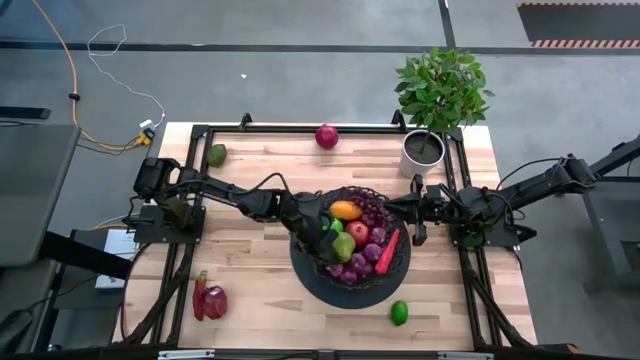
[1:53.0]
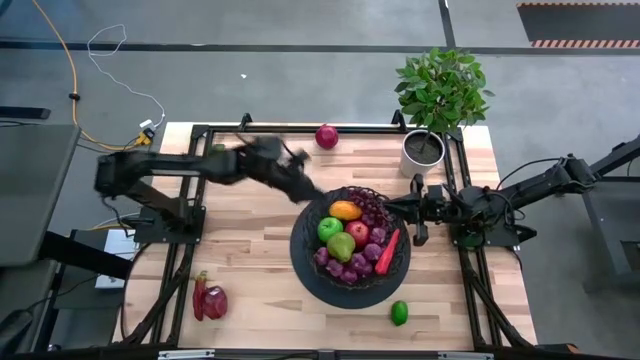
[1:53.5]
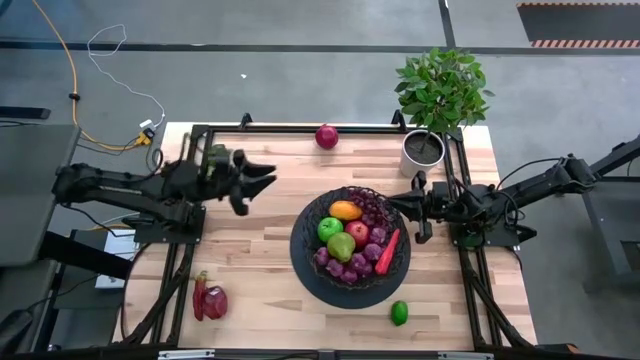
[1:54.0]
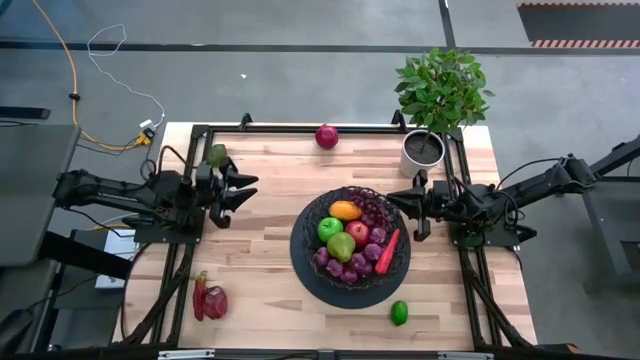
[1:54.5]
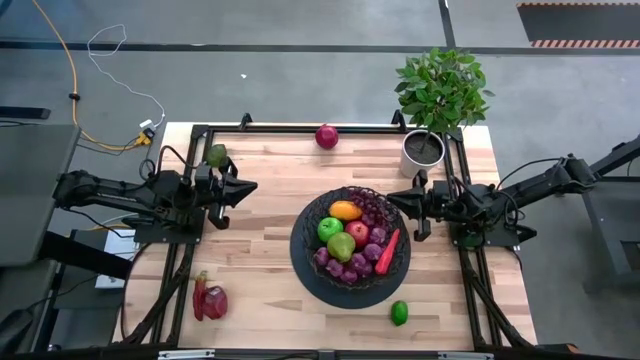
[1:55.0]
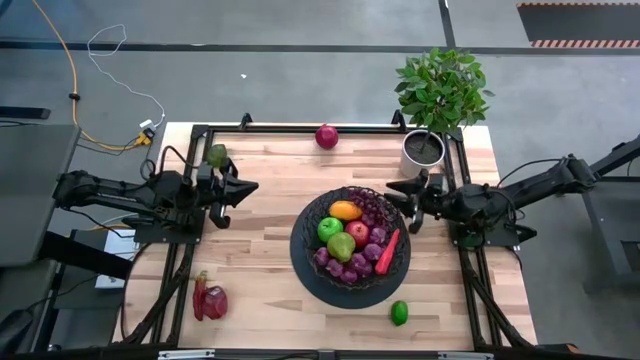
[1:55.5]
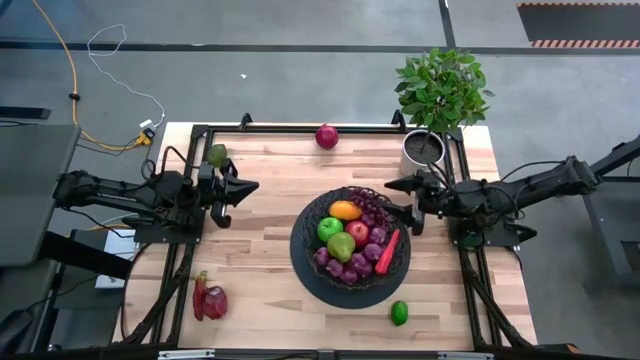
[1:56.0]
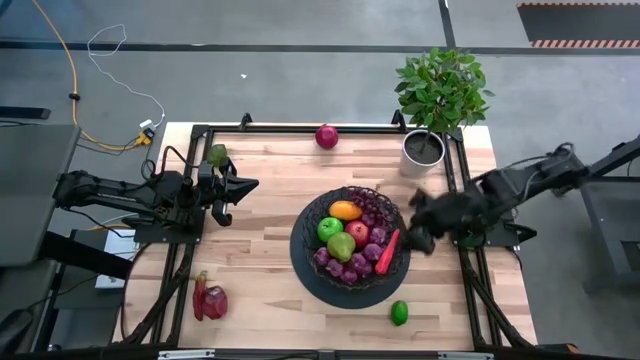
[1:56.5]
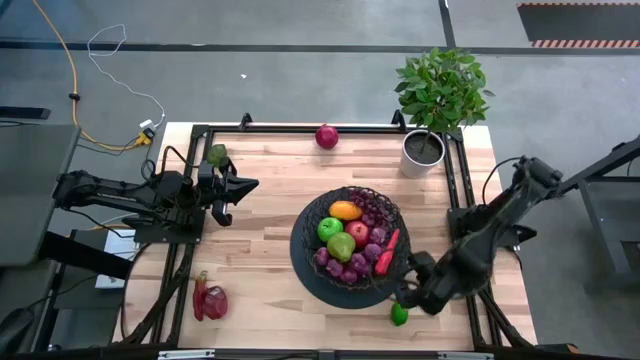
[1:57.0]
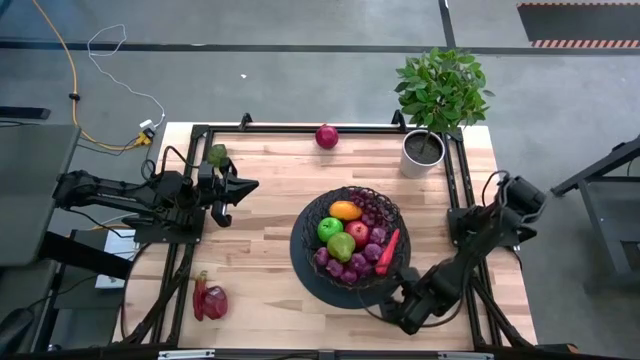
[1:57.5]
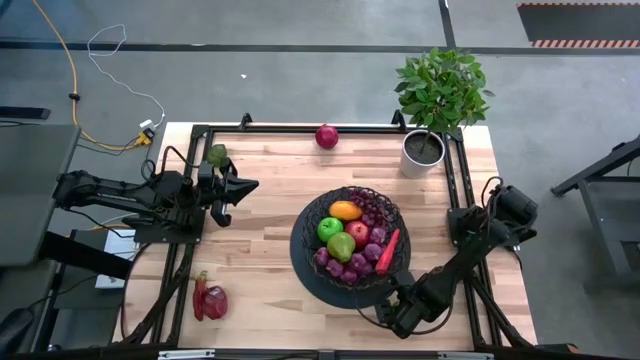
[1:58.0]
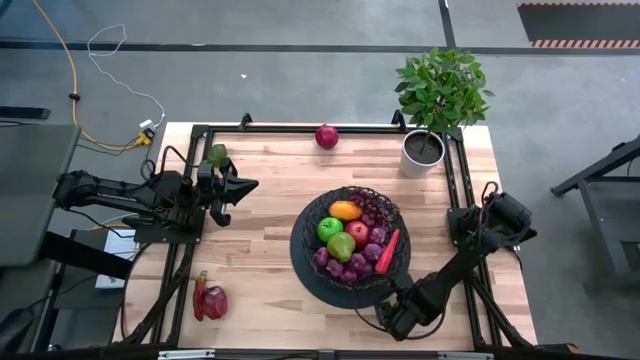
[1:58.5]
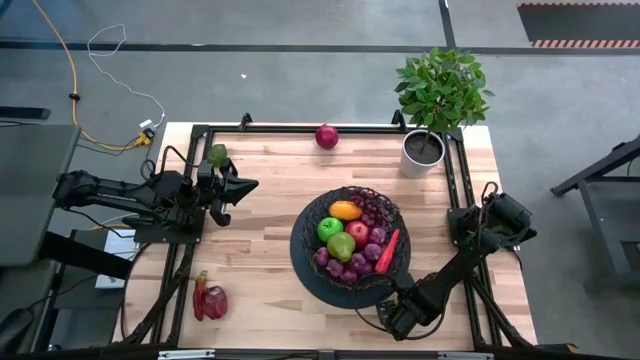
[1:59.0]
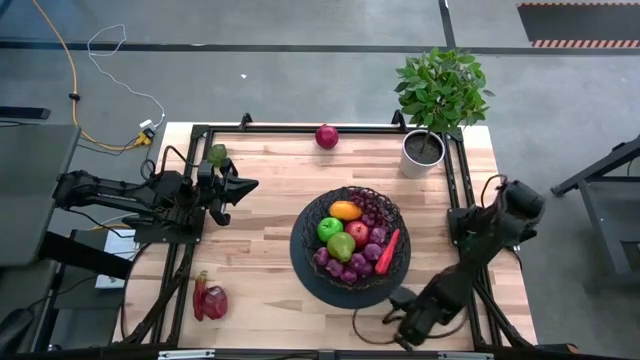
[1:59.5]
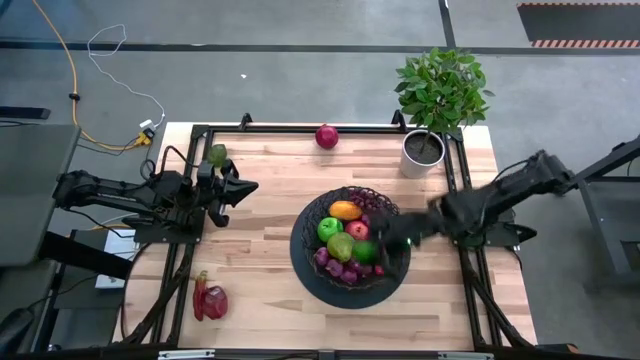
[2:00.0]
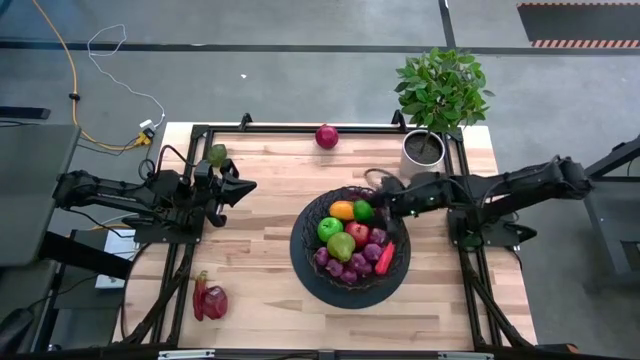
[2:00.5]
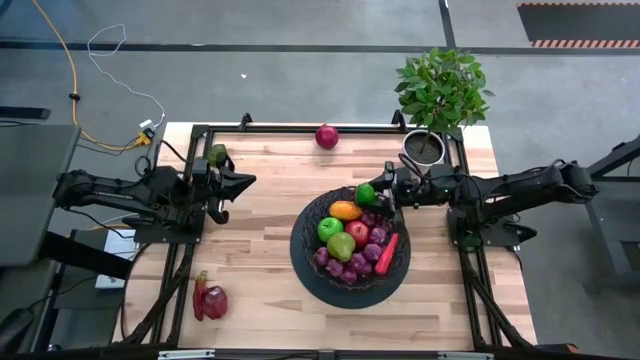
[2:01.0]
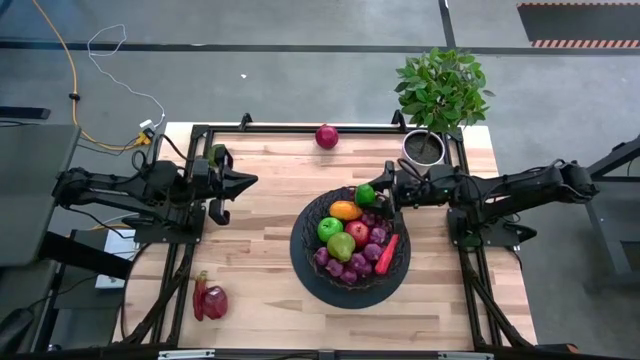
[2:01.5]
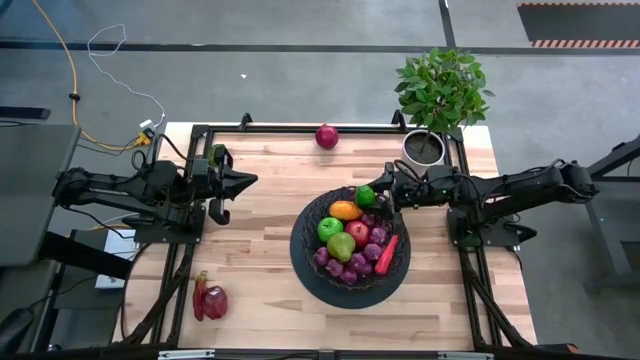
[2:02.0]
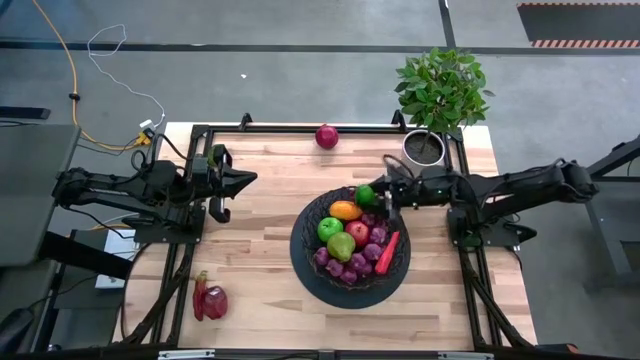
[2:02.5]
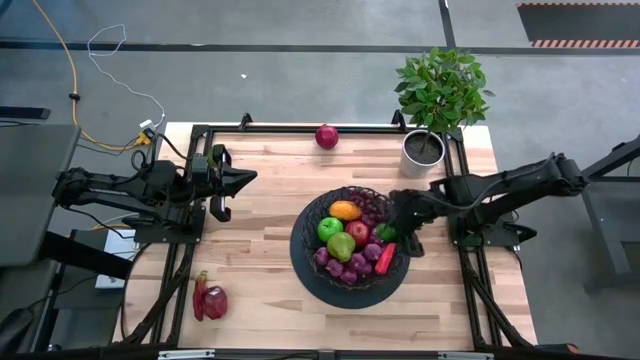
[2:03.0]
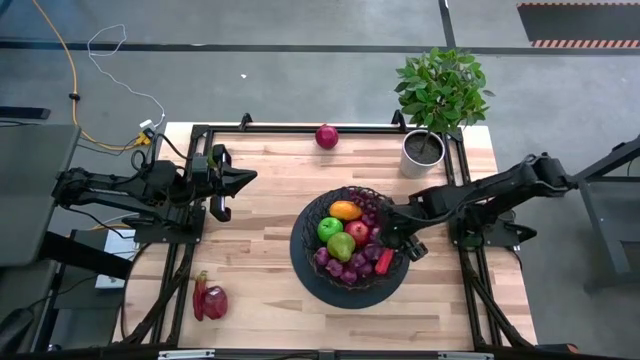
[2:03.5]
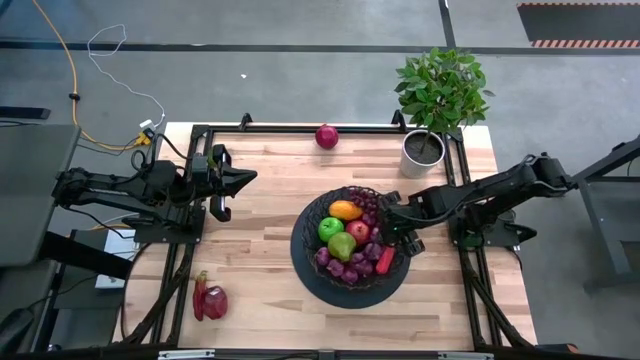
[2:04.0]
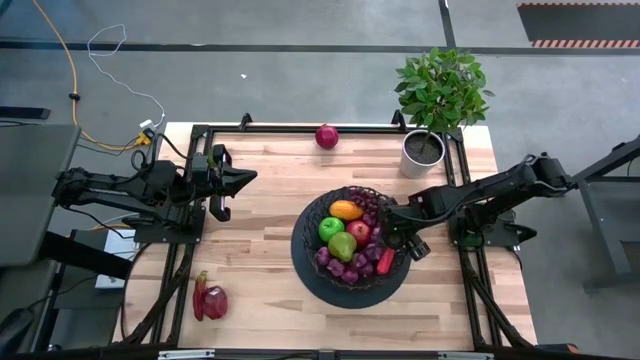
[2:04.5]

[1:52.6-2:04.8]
Task: Build produce basket
Put the green lime into the basket

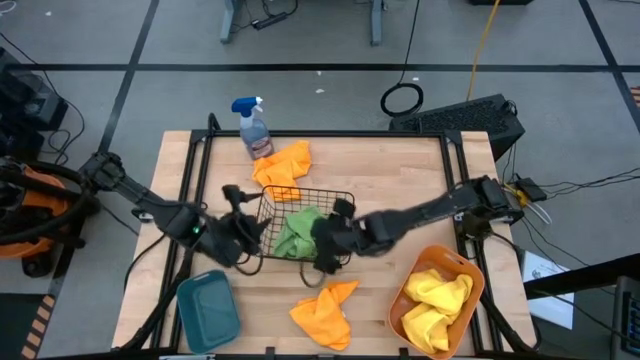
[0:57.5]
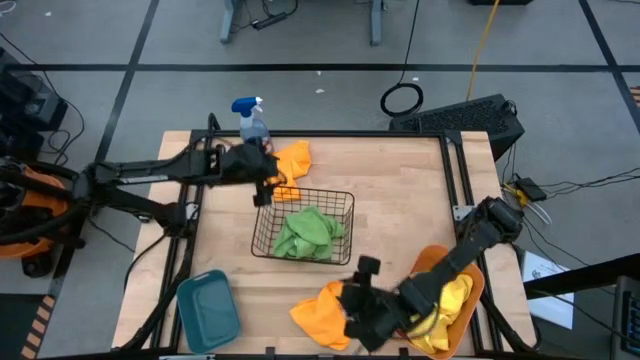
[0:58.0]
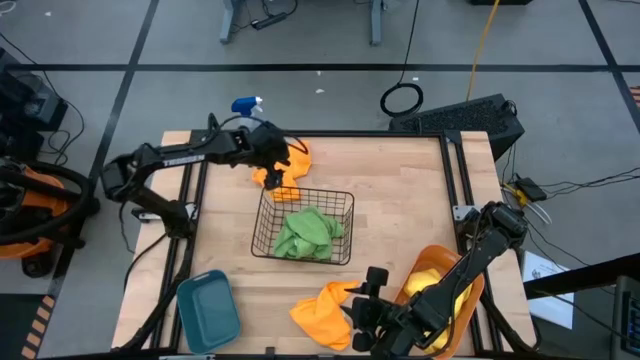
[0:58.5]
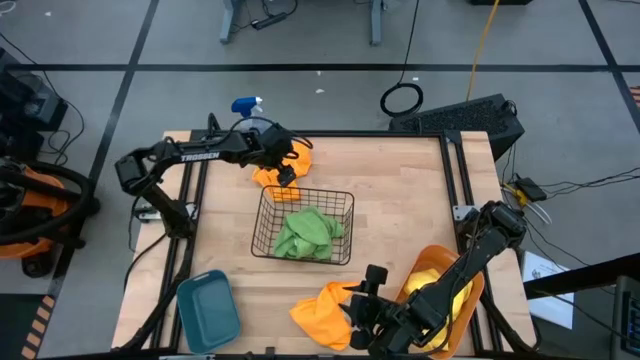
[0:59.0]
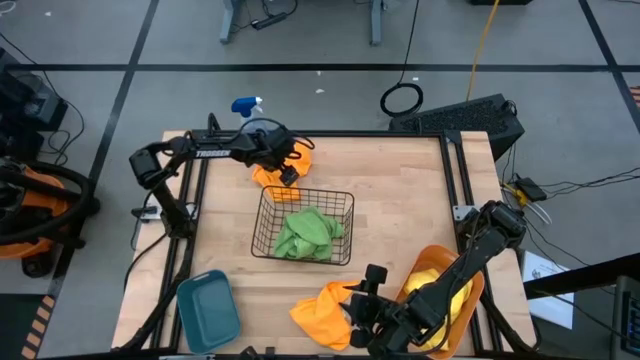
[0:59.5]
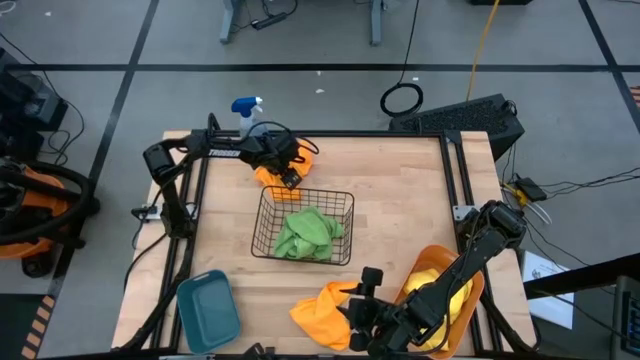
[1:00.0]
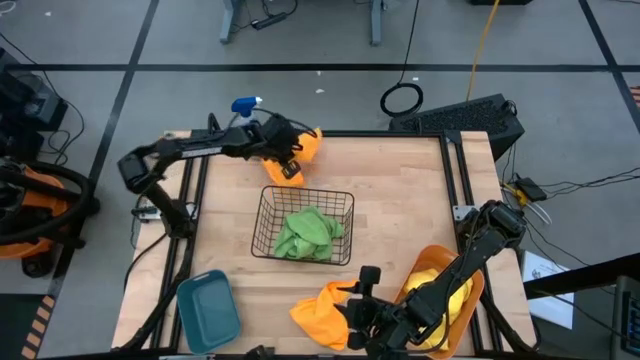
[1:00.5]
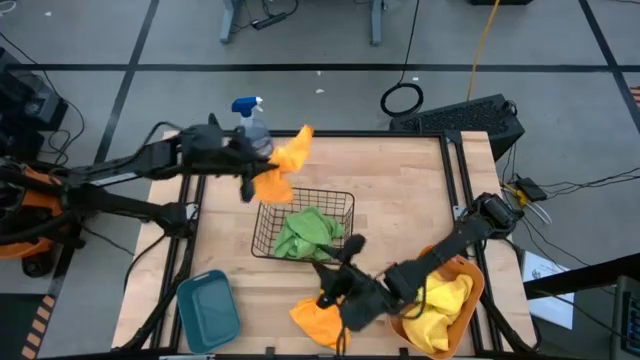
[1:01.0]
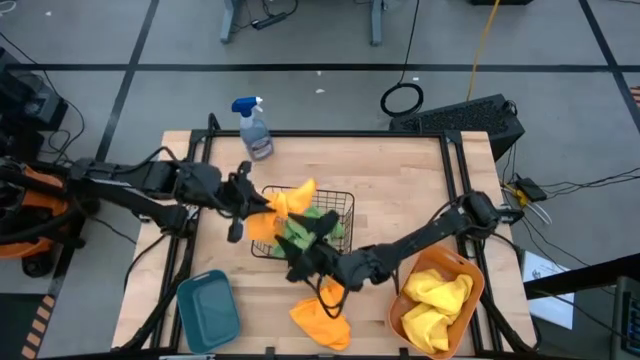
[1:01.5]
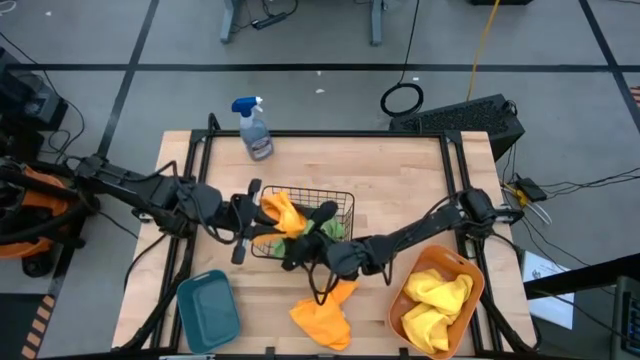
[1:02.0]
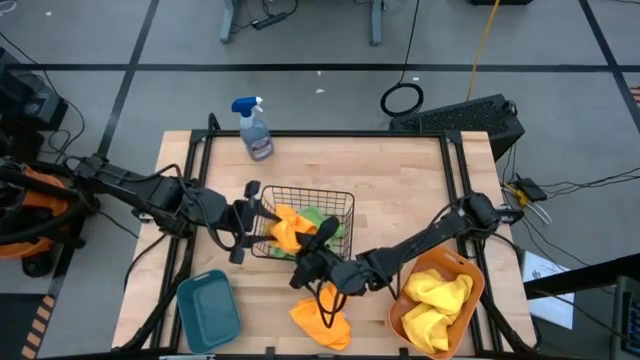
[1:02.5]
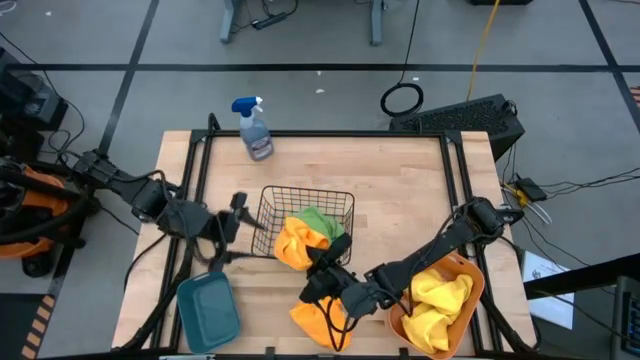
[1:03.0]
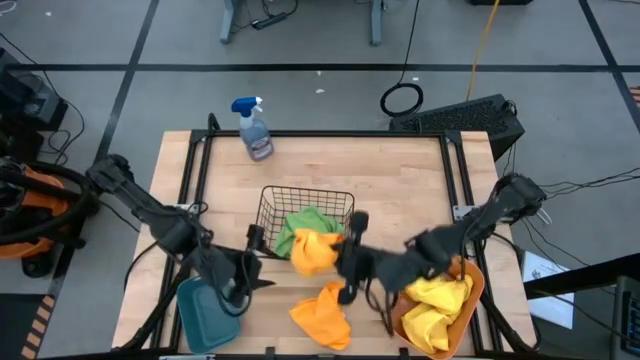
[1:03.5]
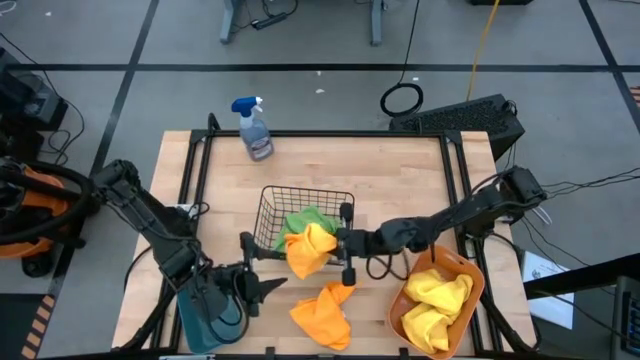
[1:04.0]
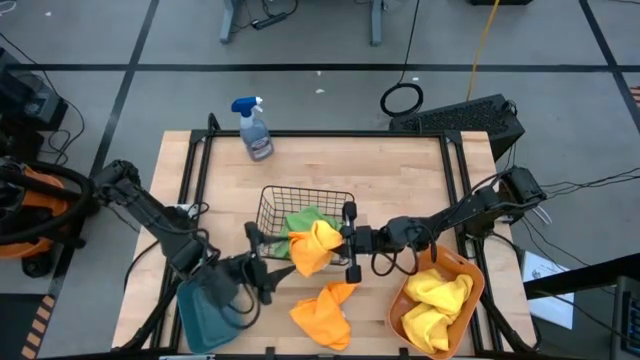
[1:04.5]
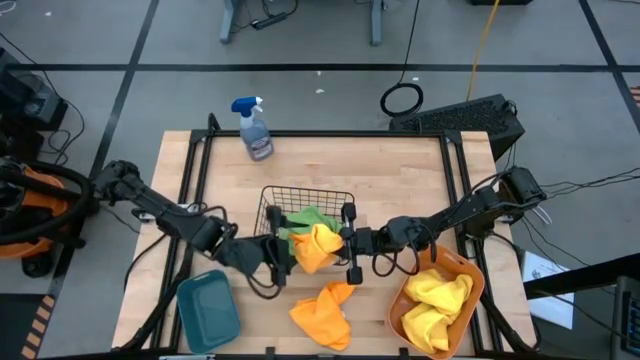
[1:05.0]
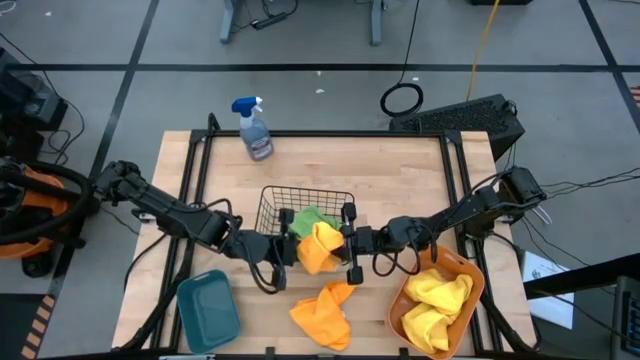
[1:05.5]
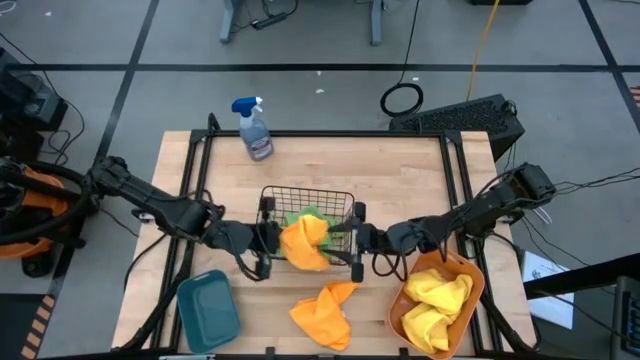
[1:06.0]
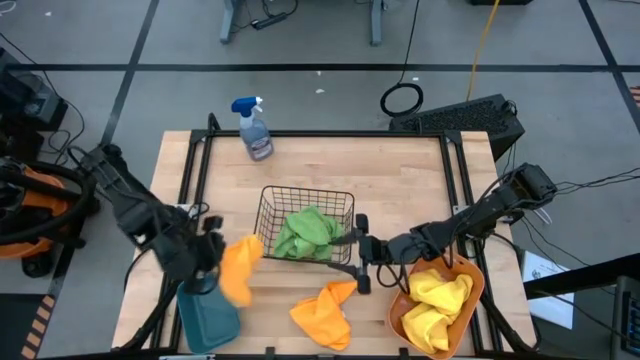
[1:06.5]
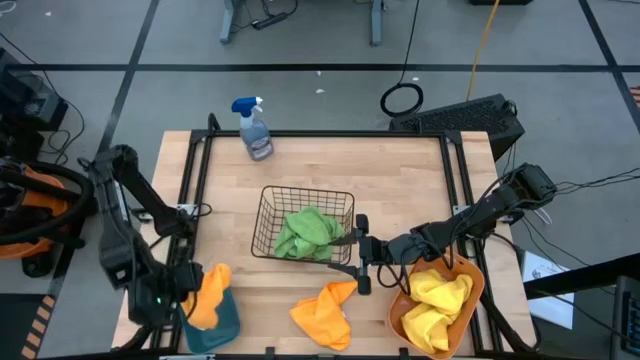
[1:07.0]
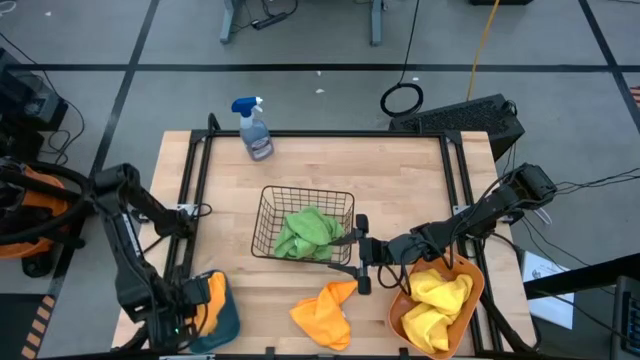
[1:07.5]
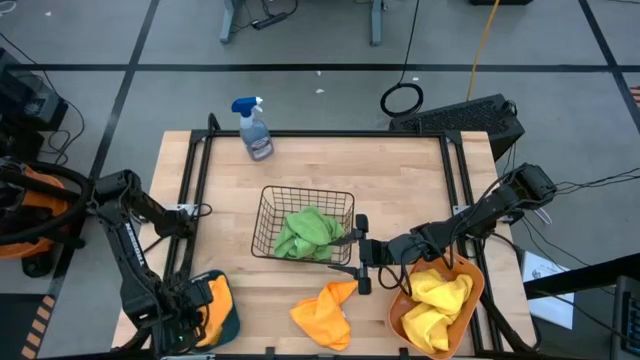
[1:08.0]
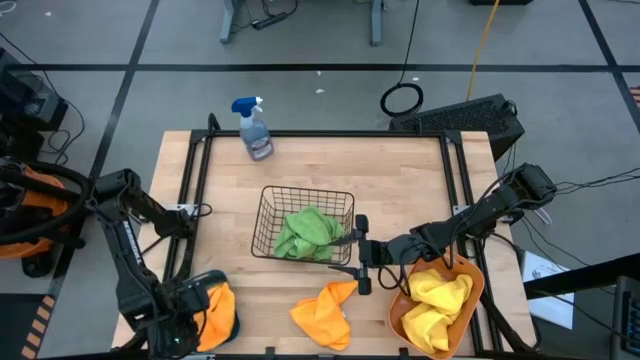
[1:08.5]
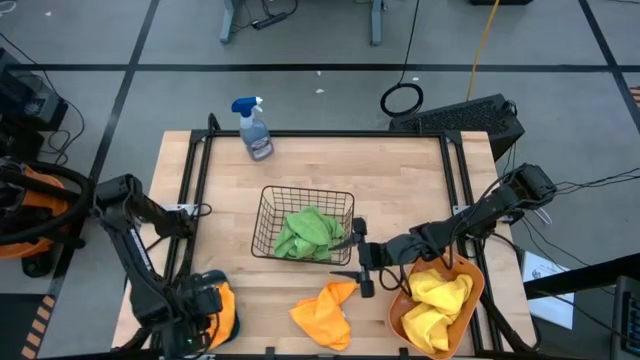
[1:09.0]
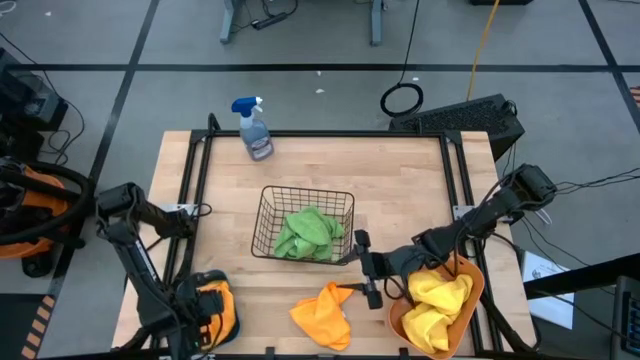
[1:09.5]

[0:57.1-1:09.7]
Task: Sort microfiber towel by color & place in baskets
Put the top orange microfiber cloth into the blue bin
